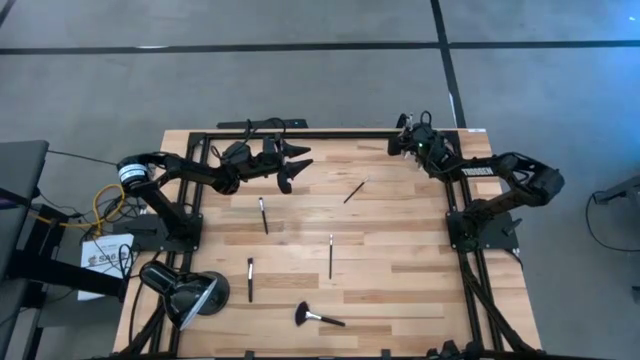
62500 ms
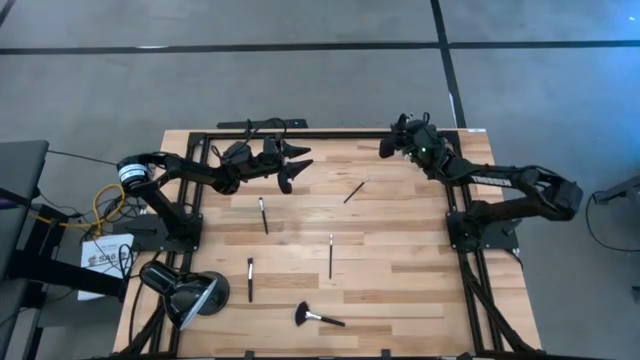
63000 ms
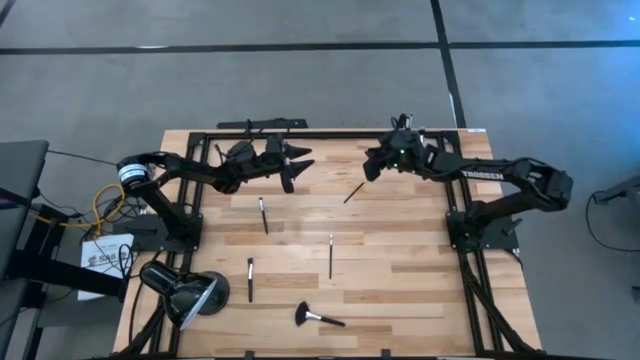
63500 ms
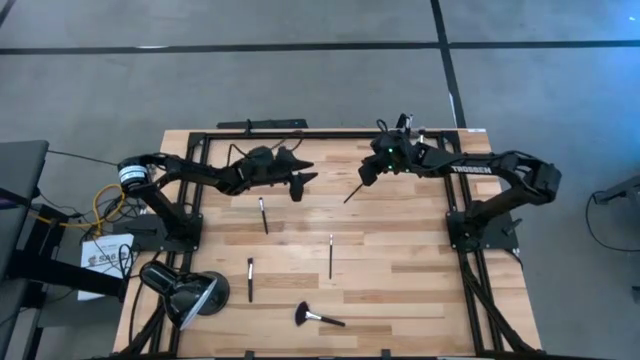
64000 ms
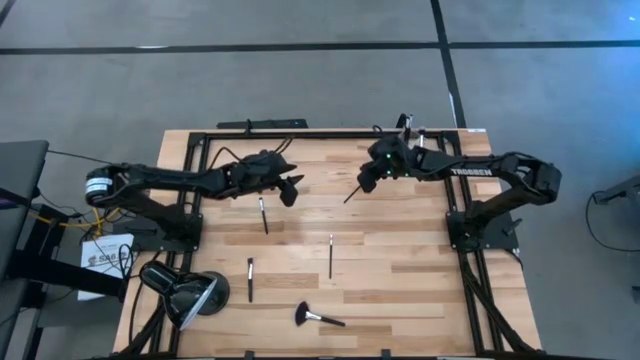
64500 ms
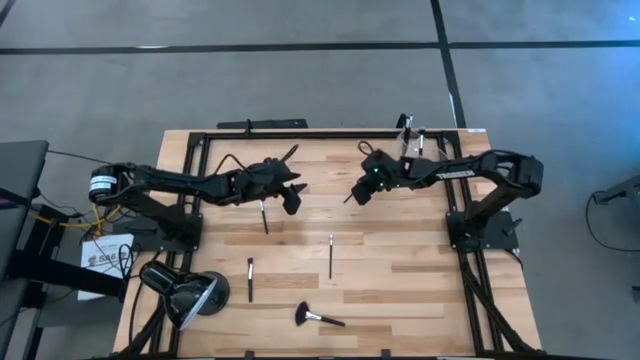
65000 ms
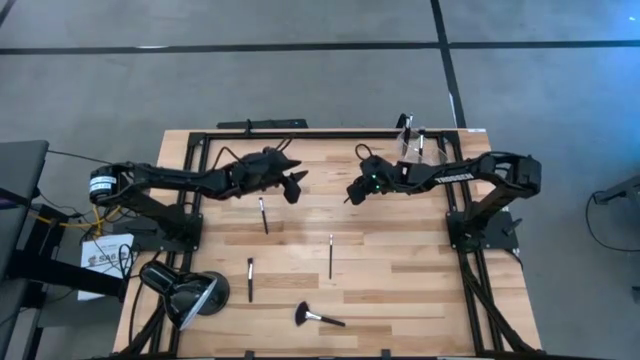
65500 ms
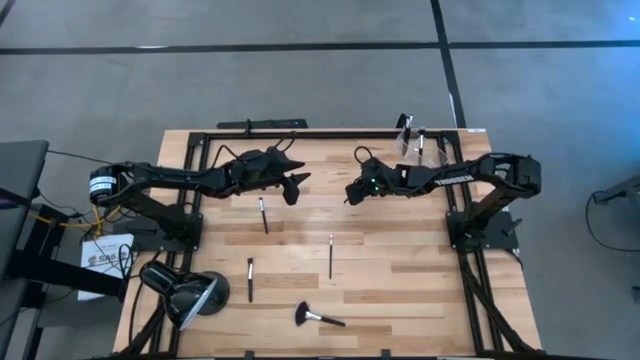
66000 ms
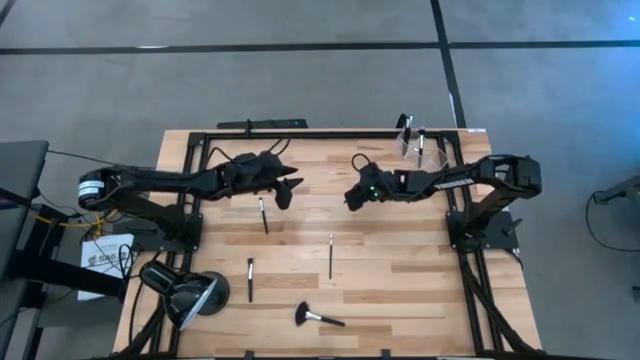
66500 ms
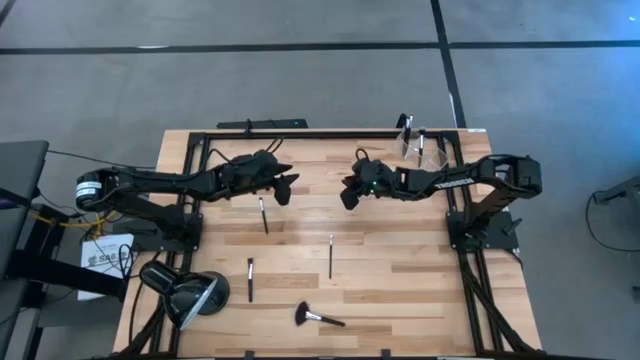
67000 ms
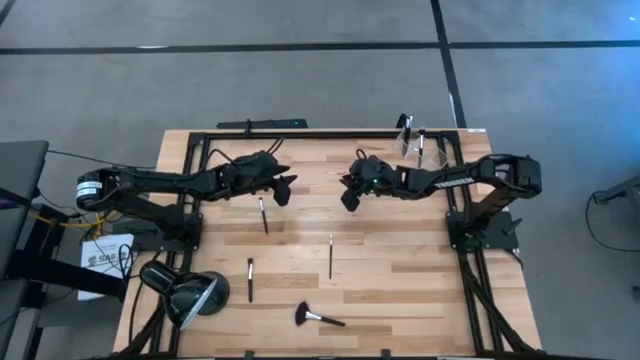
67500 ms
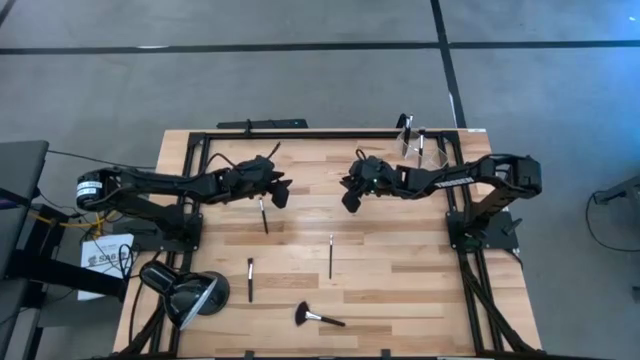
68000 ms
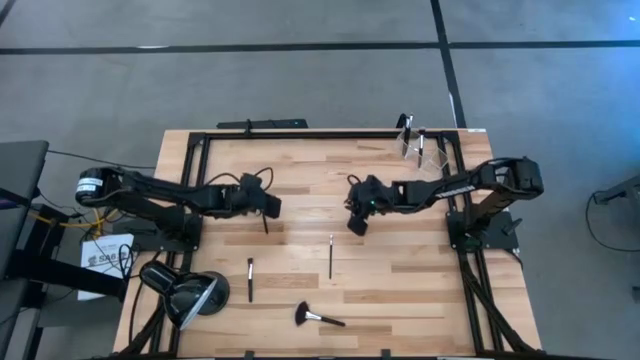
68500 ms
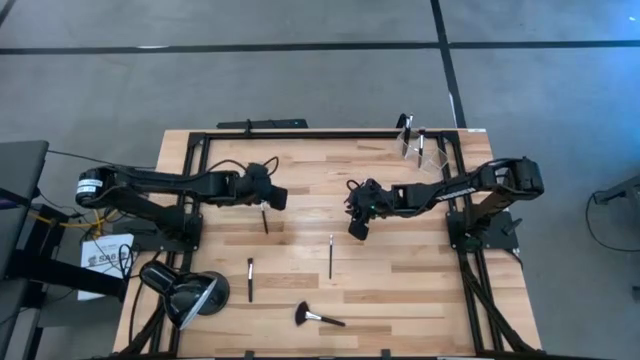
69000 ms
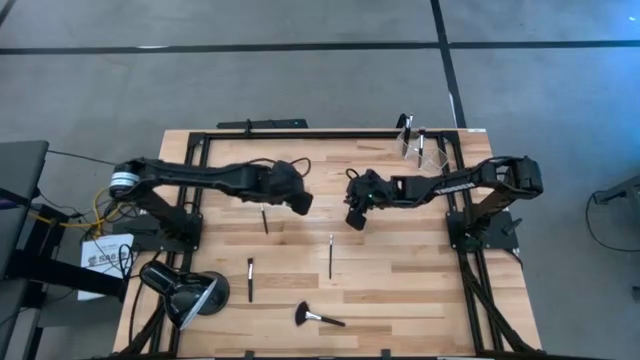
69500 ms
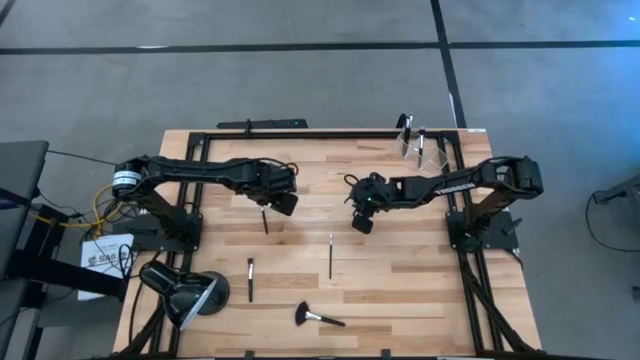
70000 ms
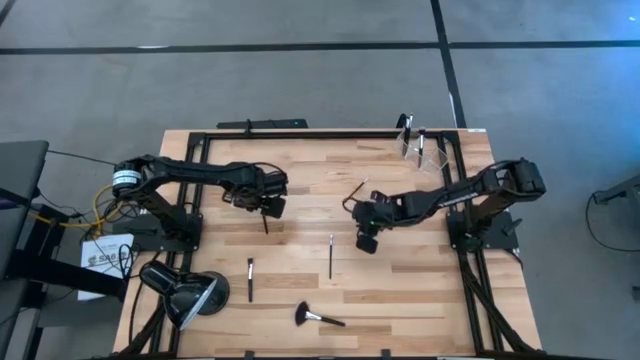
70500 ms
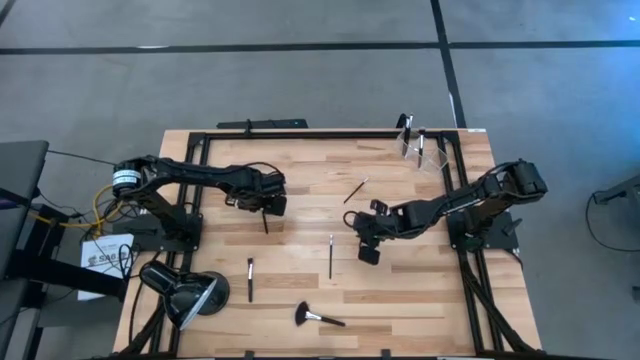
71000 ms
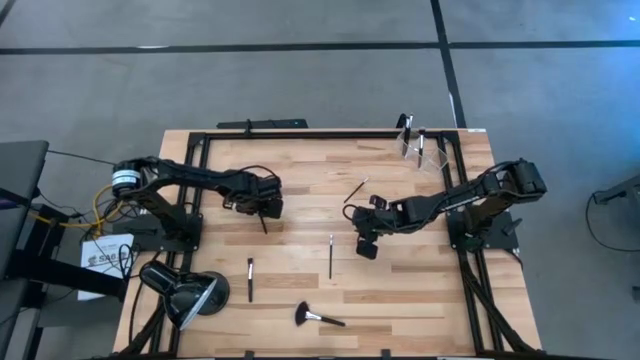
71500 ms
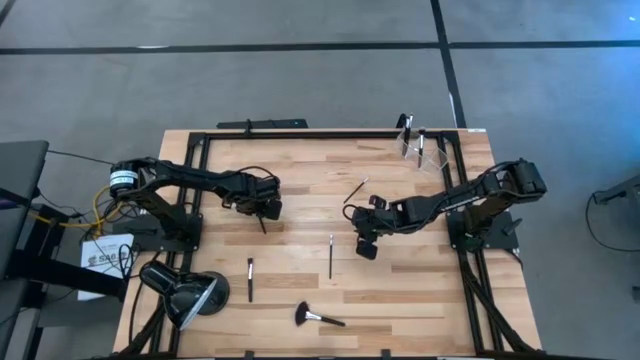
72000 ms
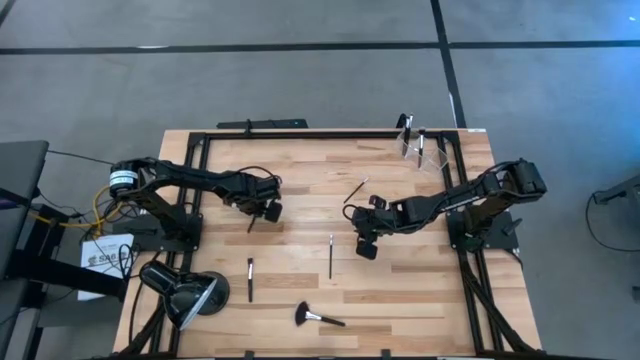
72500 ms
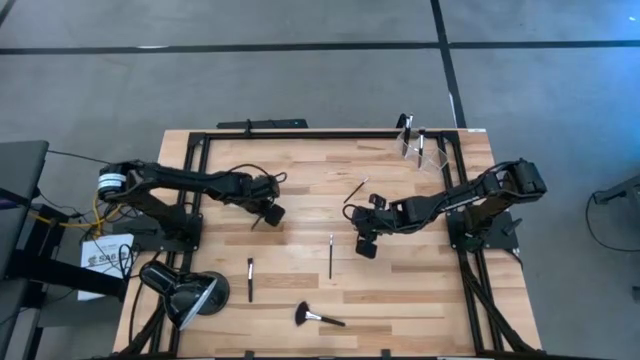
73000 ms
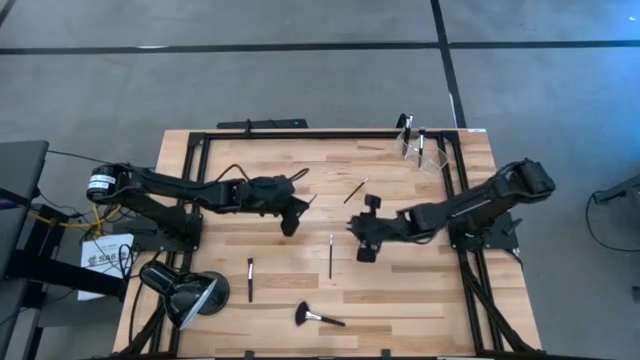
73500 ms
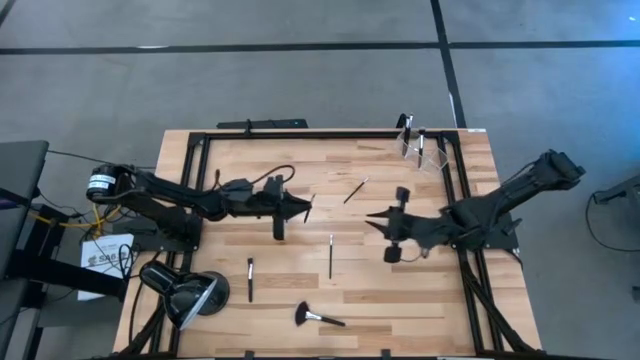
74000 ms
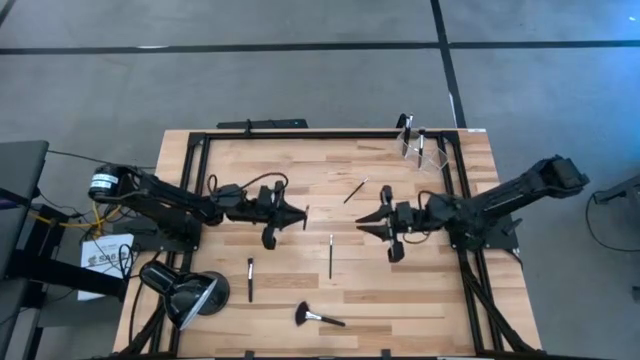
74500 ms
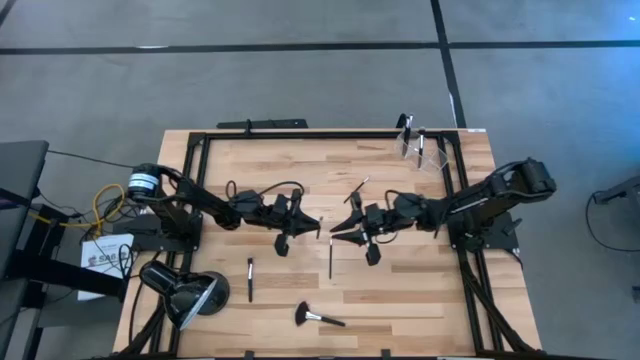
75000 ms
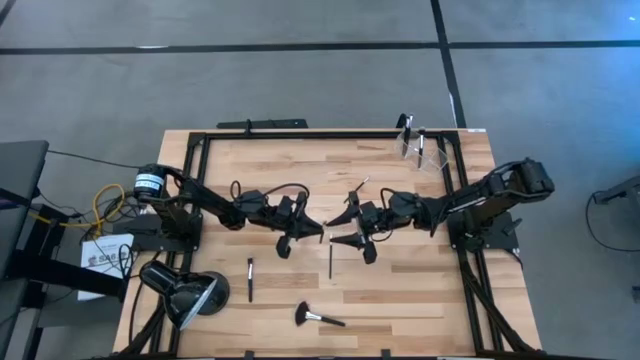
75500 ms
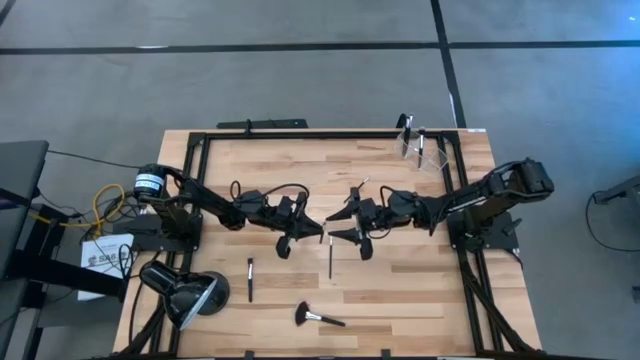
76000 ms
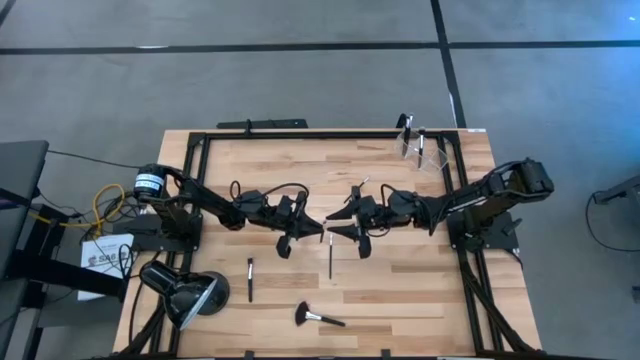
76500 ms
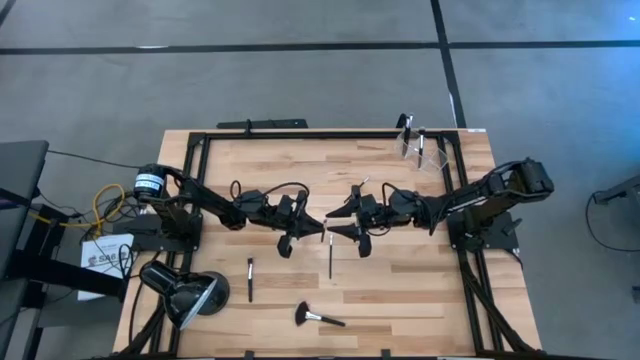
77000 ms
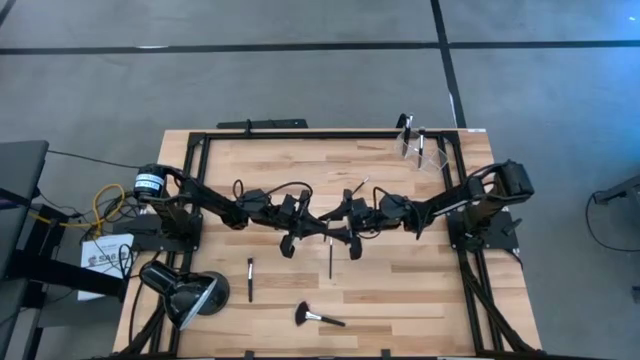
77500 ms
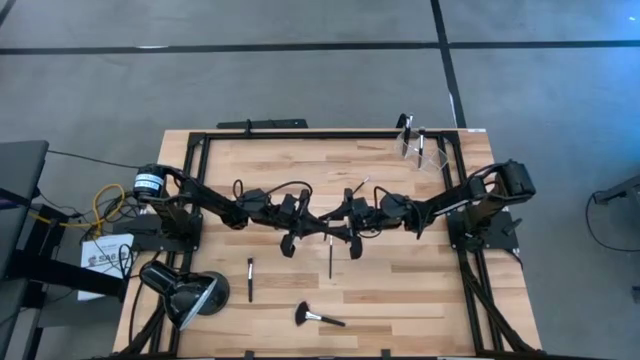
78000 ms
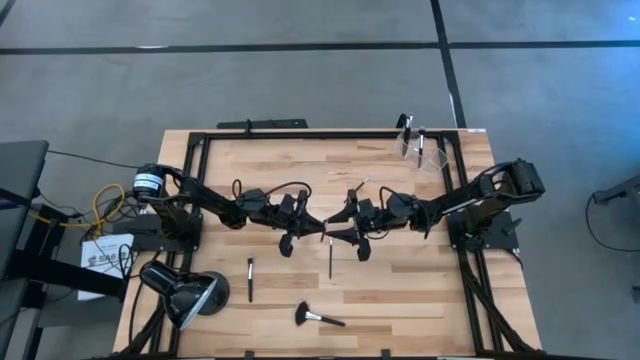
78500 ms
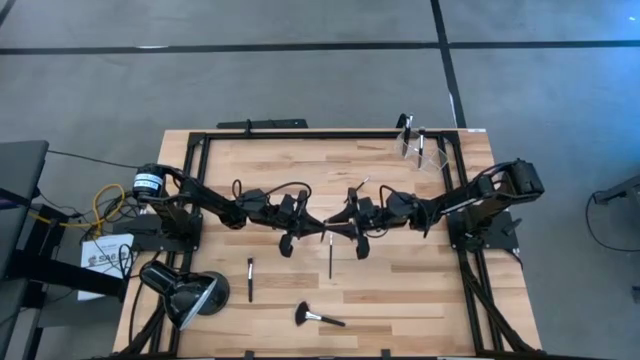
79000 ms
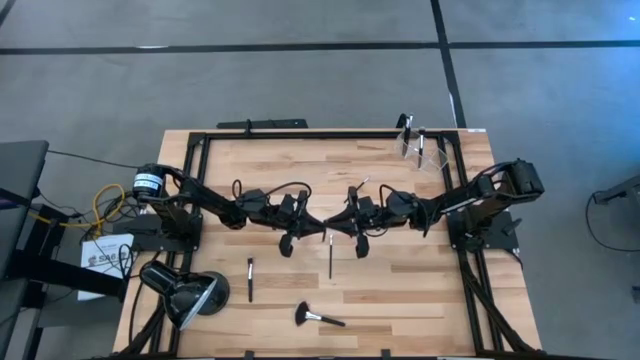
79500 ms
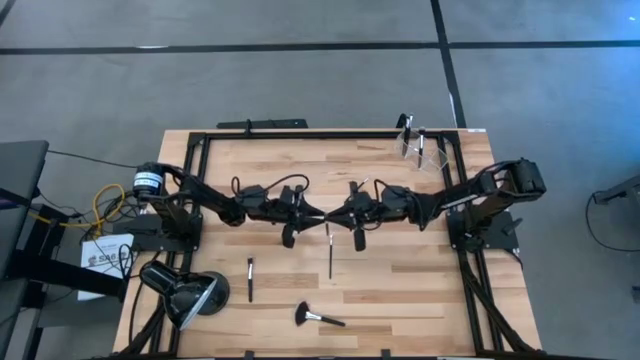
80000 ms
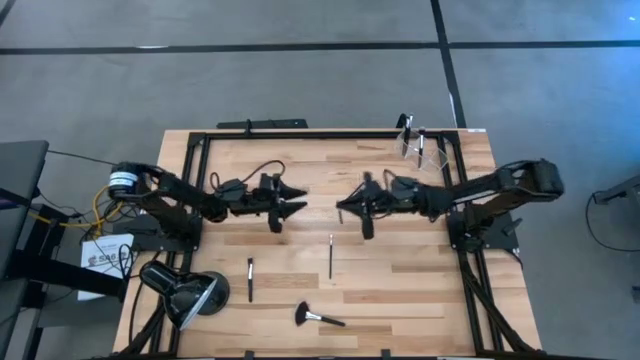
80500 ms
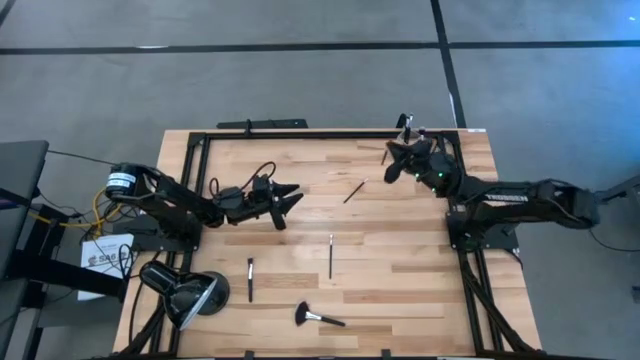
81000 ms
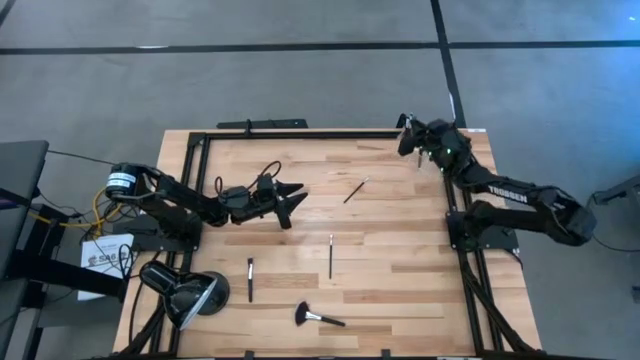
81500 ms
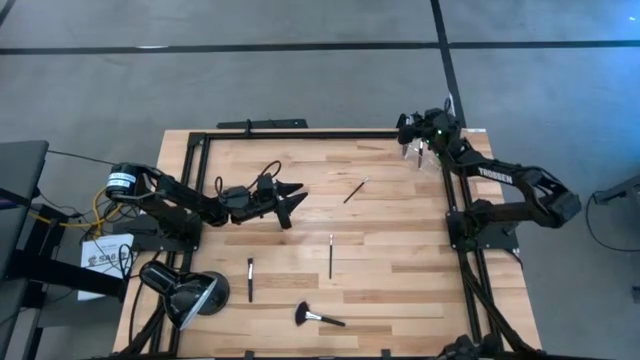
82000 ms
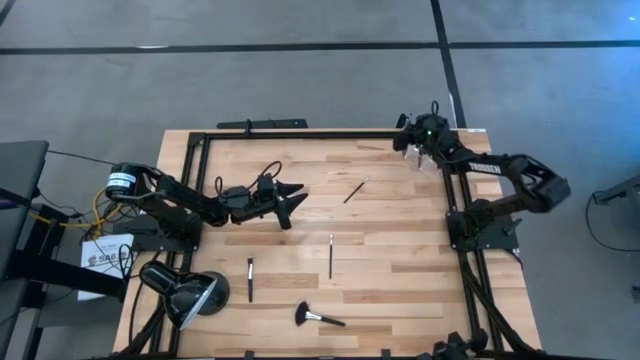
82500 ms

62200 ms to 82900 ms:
Task: Put items in baskets/containers
Put the black eyeshadow brush into the transparent organizer

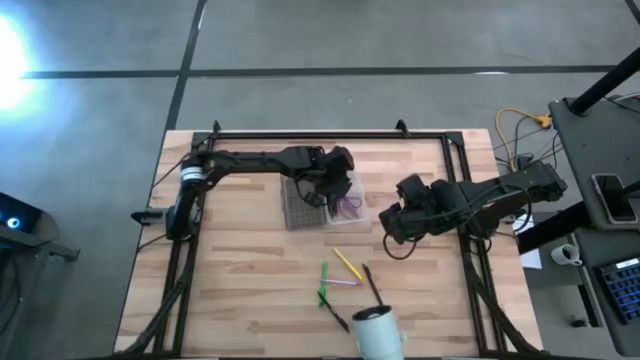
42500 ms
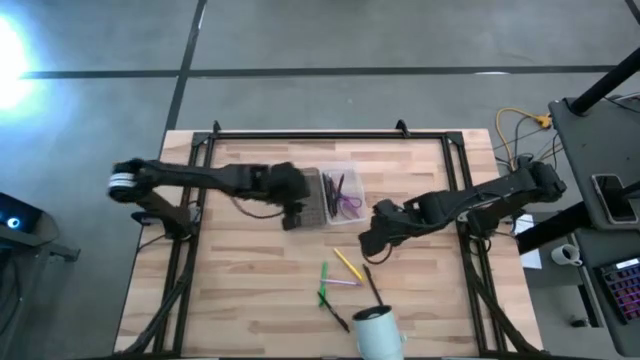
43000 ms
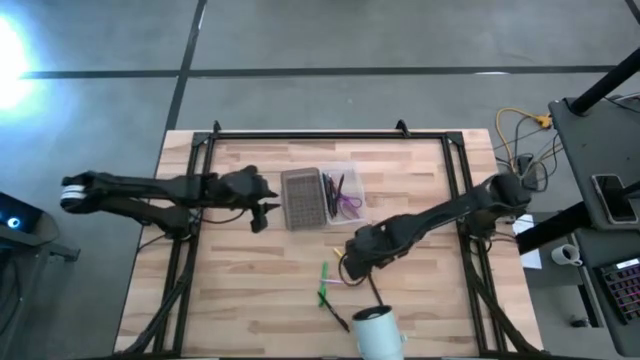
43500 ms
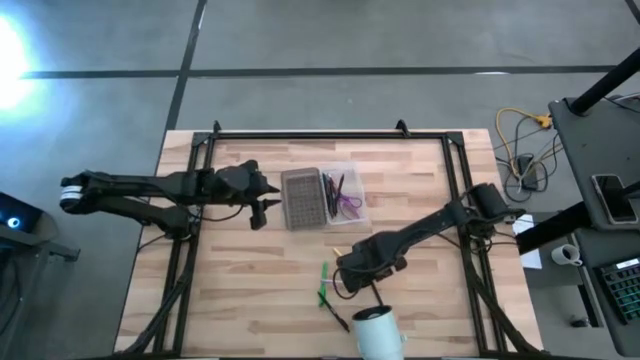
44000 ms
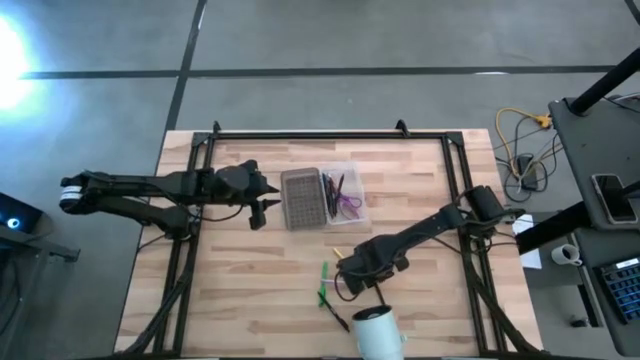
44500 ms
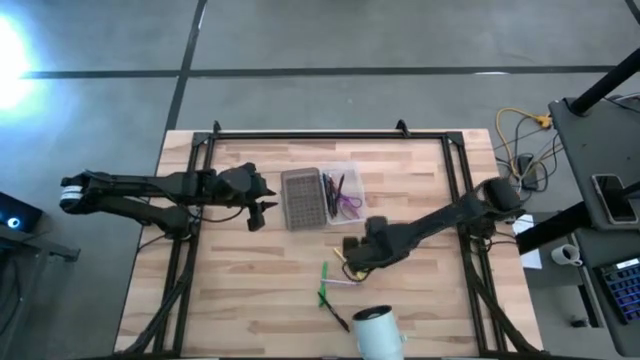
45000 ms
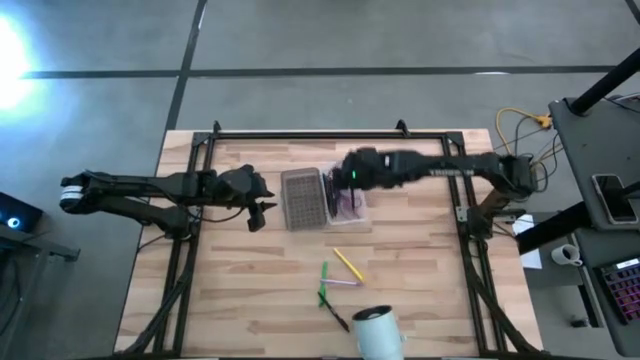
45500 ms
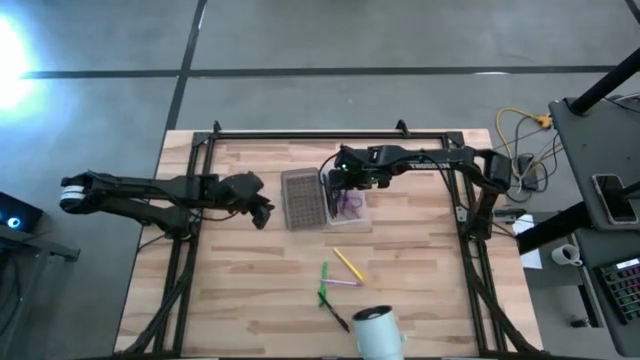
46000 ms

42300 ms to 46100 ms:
Task: Pick & place school supplies into a supply box
Put the black pen into the gray supply box
